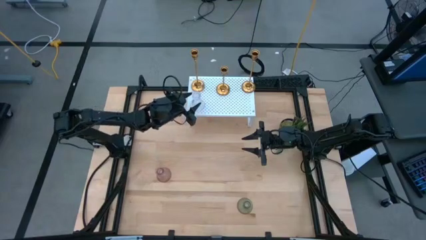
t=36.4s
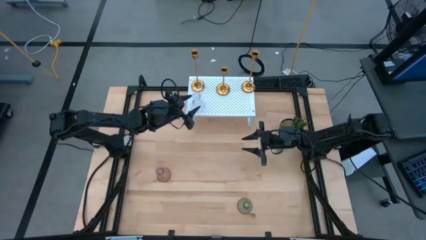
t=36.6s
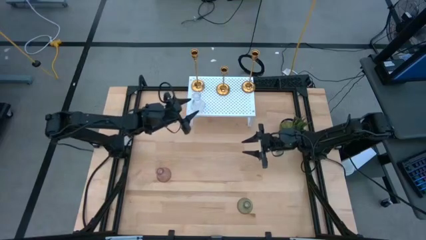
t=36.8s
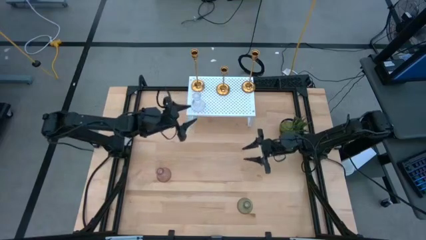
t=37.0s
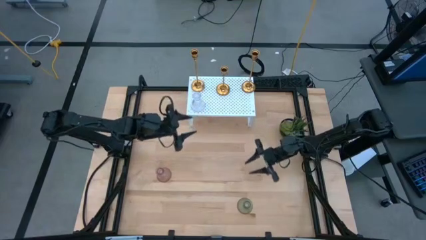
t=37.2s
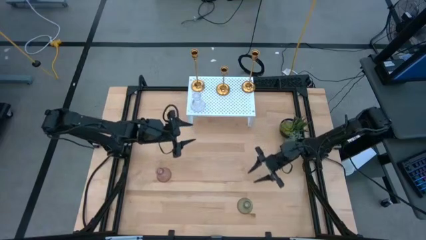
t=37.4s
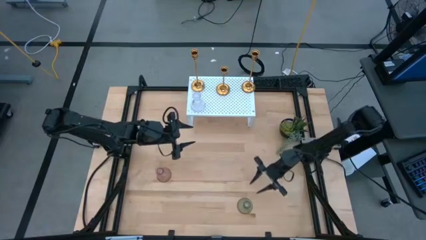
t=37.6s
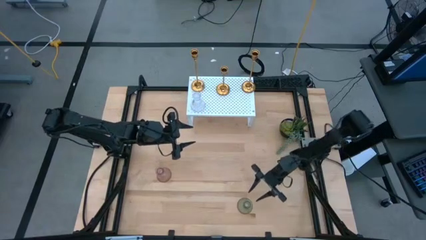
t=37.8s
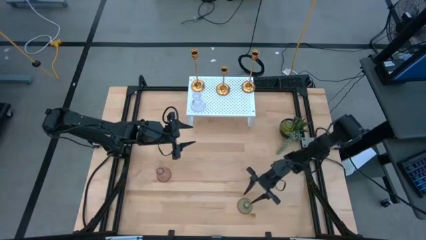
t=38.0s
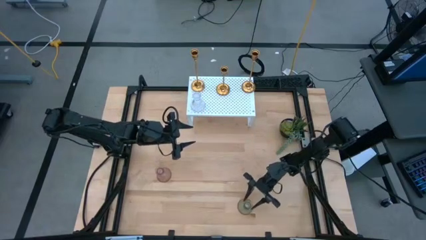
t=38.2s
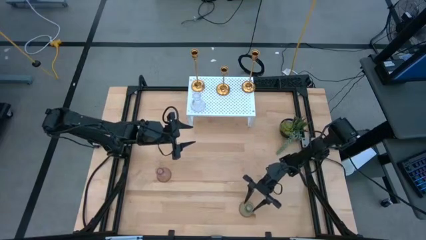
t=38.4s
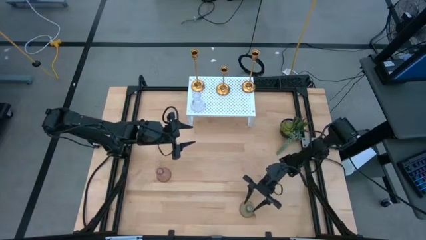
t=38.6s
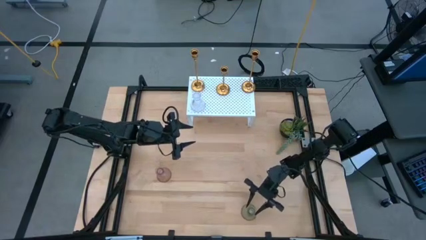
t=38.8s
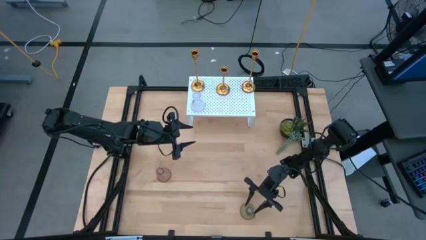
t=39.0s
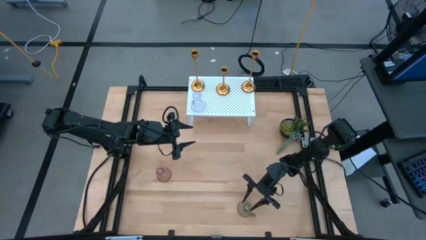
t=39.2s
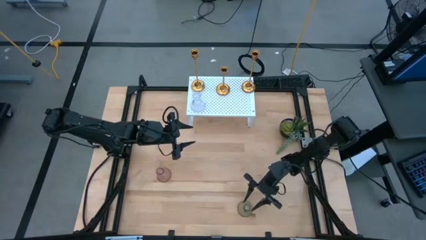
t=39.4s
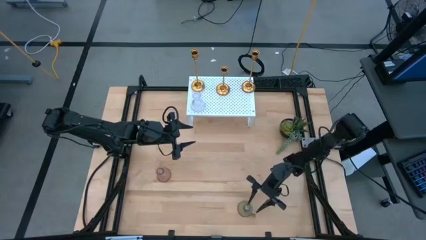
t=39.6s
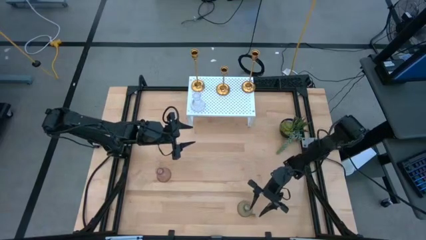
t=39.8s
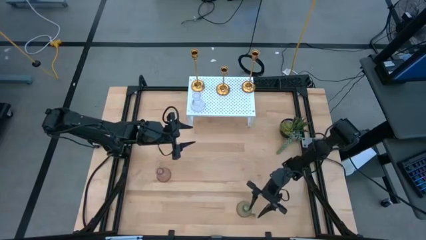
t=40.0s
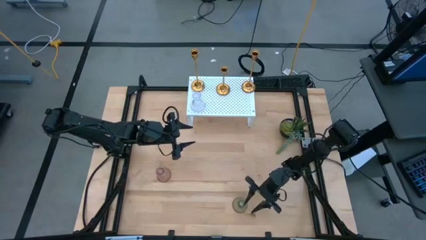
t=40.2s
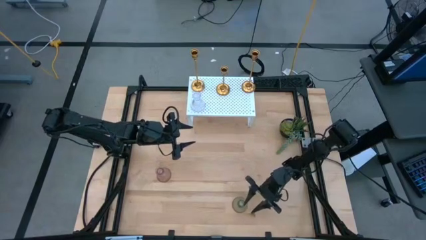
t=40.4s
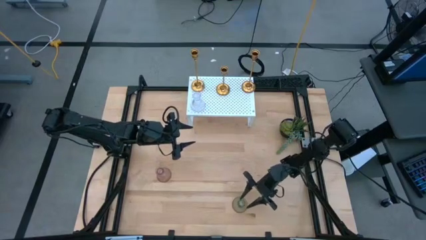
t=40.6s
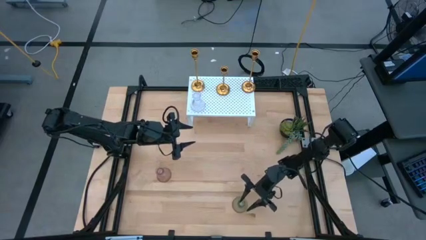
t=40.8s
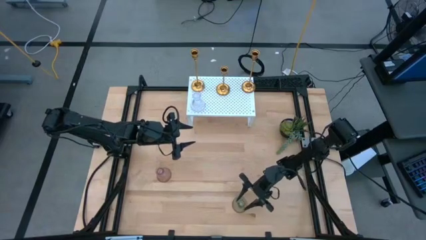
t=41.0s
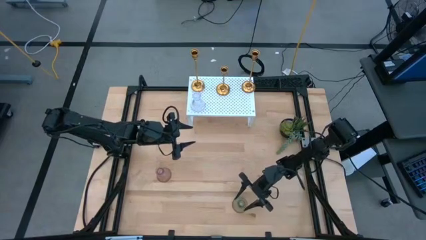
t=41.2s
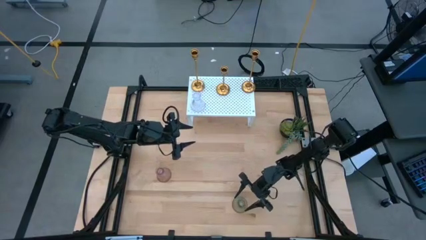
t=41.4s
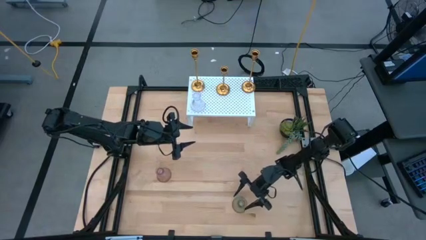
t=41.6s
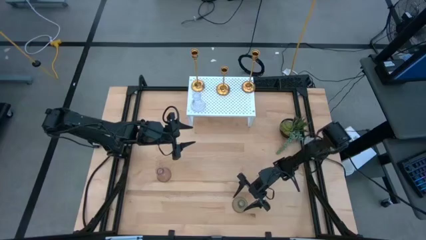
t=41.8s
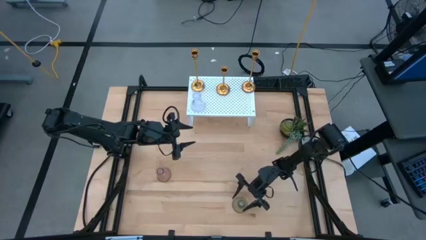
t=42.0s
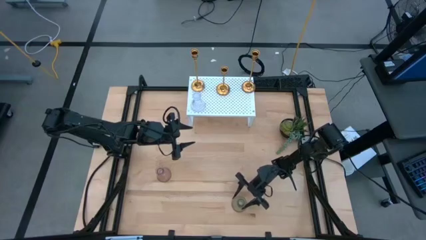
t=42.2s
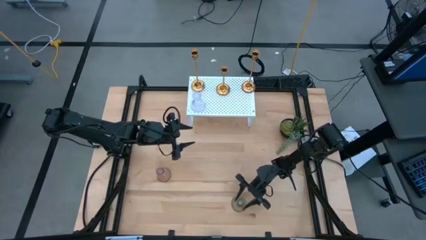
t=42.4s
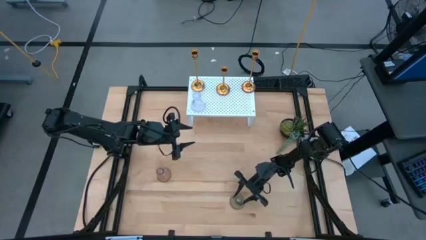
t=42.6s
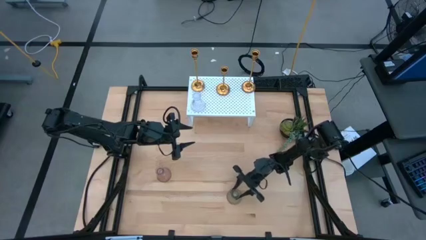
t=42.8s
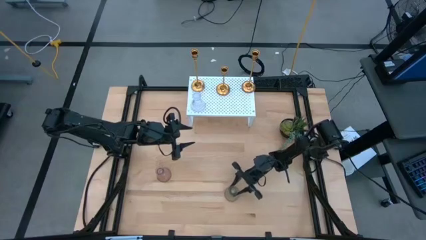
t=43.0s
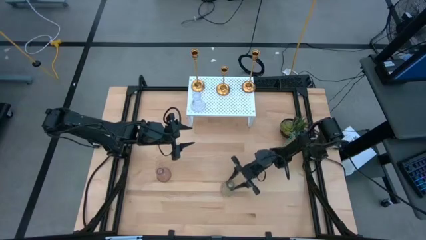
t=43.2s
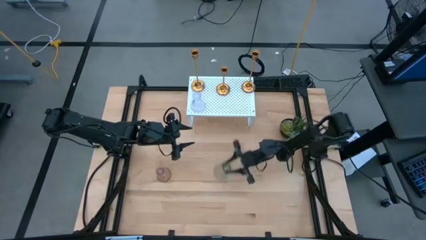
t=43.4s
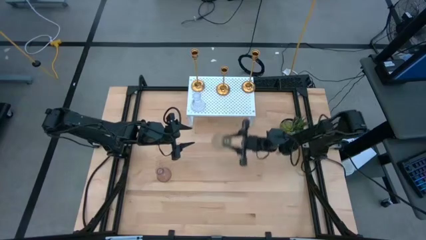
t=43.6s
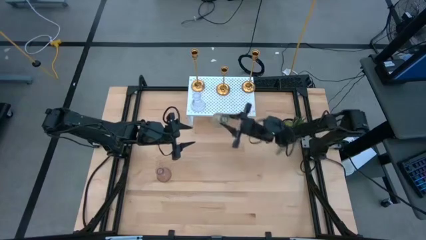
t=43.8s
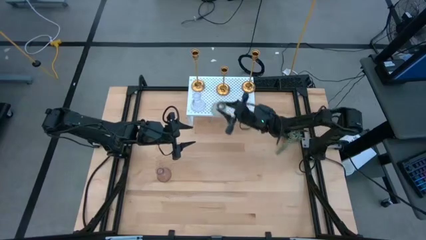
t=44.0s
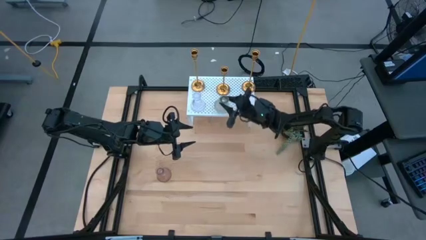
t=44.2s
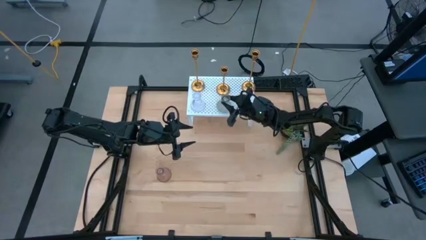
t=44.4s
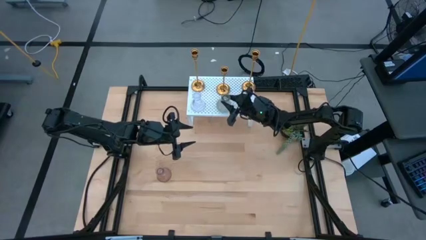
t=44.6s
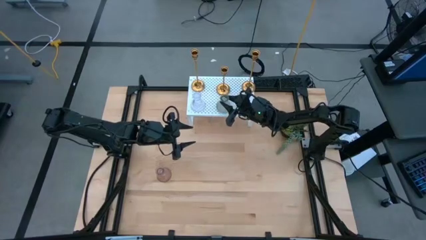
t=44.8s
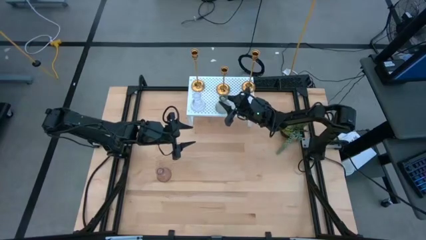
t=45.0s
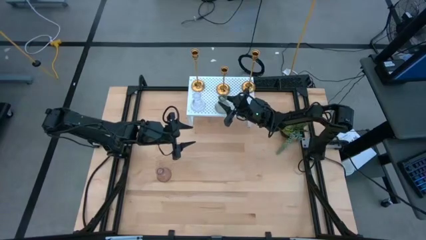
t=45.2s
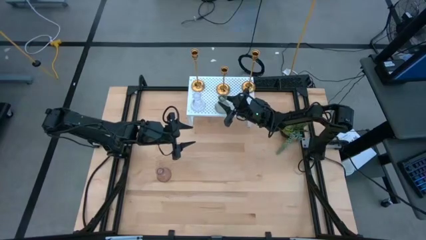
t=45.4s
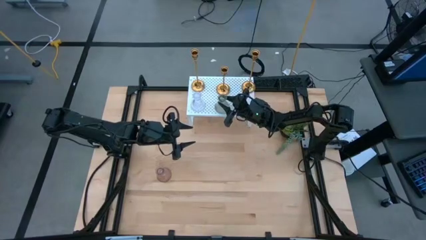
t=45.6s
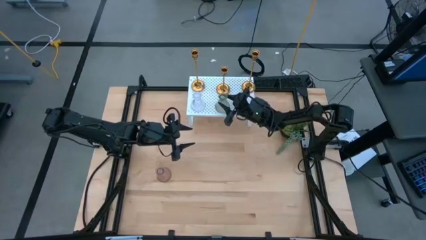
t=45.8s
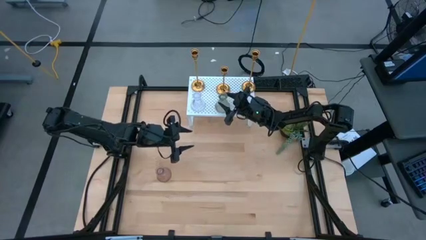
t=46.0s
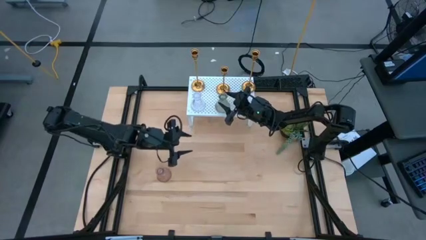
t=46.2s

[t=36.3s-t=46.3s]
Task: Pick & Place candle stick holders
Put the green glass candle holder on the shelf aligned with the other glass candle holder

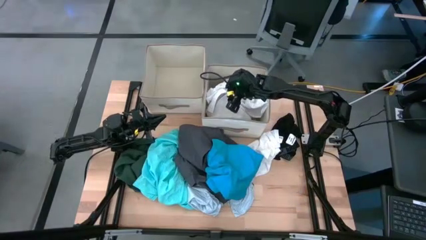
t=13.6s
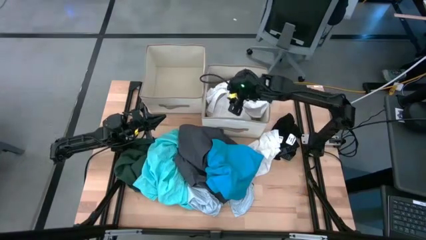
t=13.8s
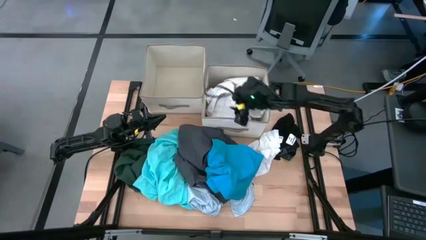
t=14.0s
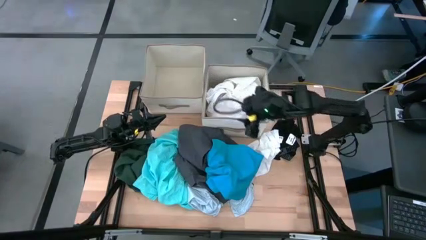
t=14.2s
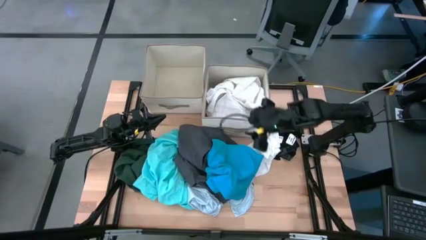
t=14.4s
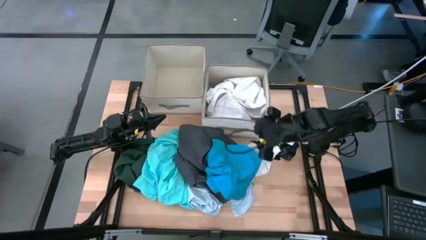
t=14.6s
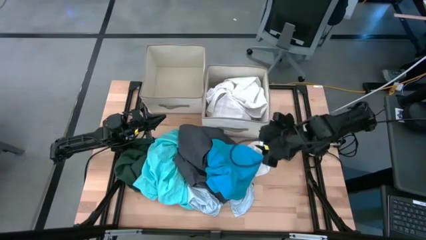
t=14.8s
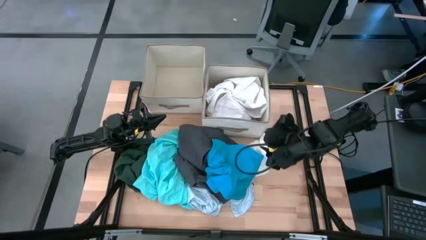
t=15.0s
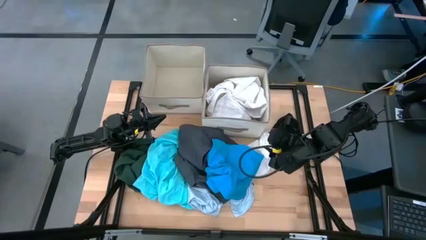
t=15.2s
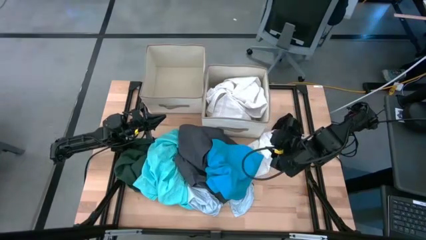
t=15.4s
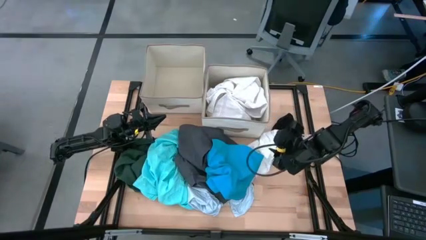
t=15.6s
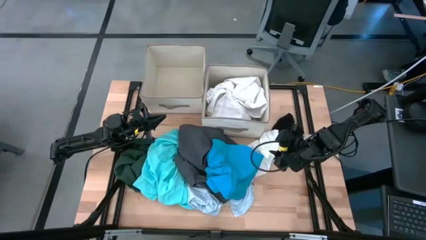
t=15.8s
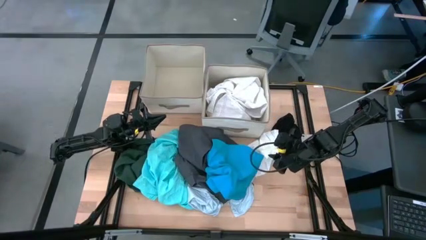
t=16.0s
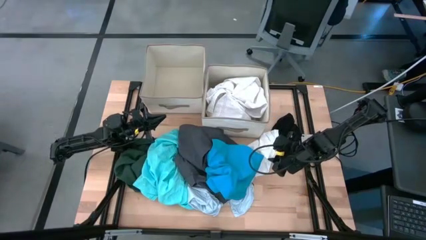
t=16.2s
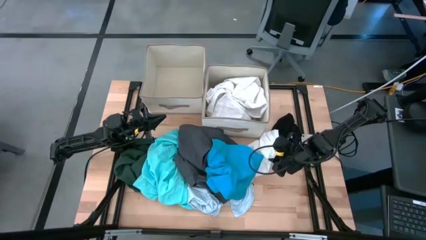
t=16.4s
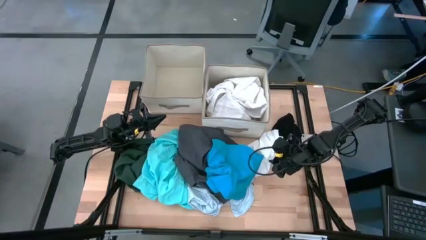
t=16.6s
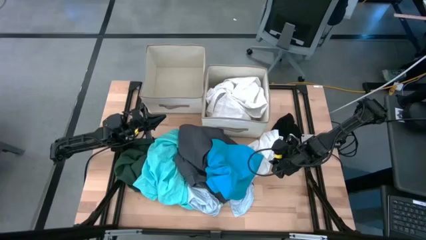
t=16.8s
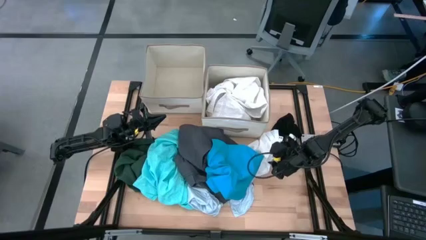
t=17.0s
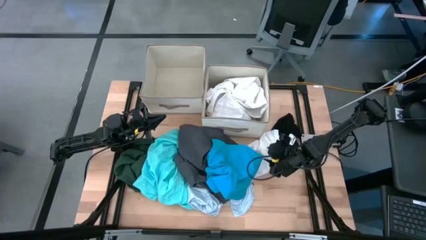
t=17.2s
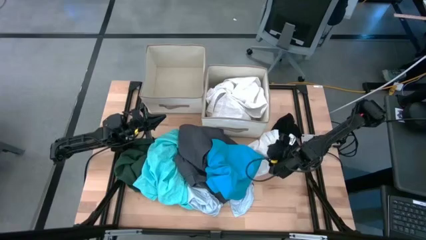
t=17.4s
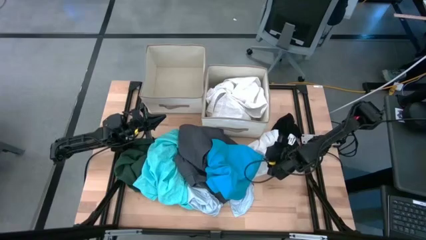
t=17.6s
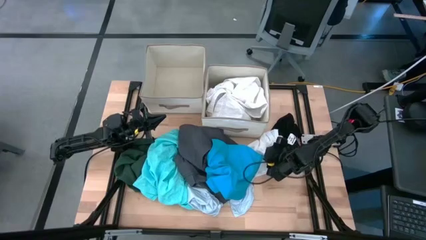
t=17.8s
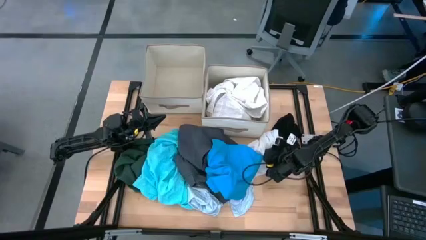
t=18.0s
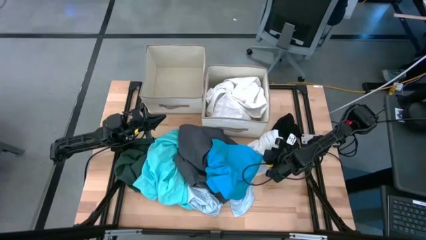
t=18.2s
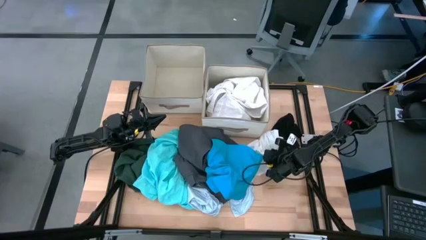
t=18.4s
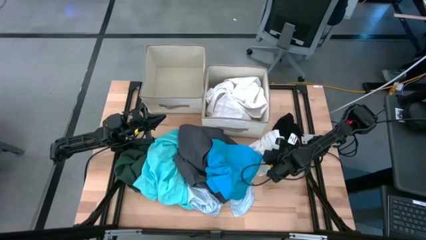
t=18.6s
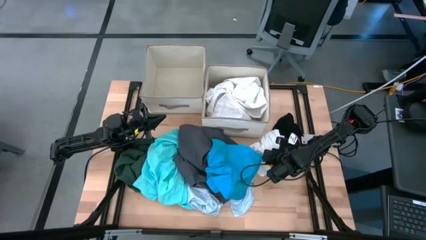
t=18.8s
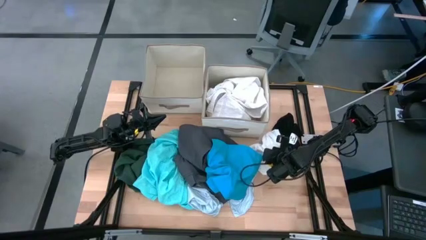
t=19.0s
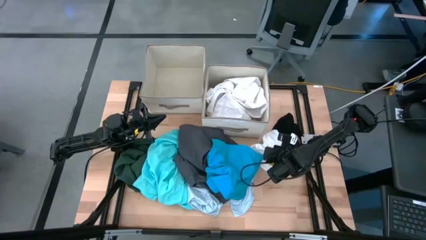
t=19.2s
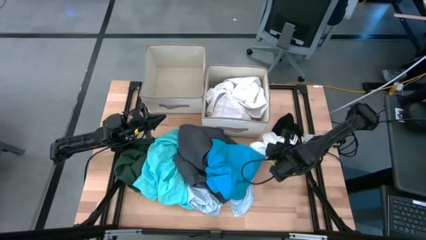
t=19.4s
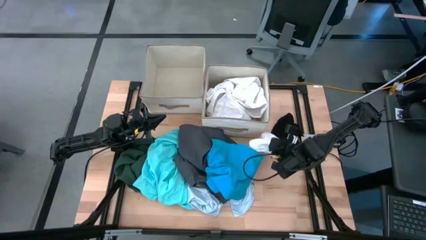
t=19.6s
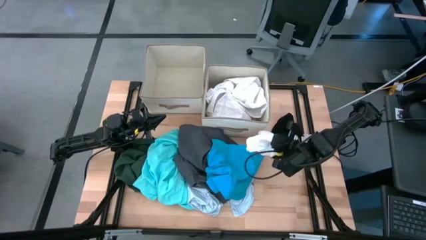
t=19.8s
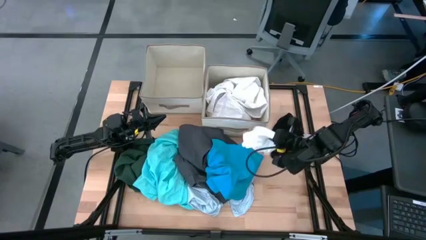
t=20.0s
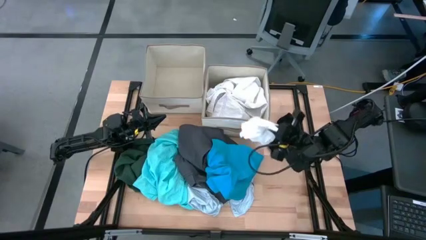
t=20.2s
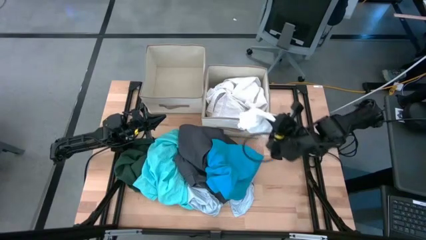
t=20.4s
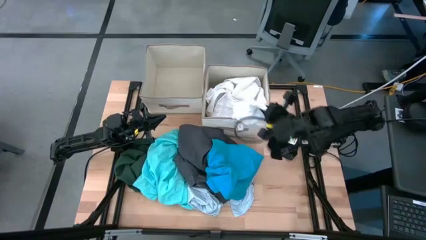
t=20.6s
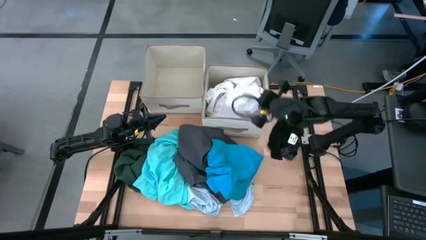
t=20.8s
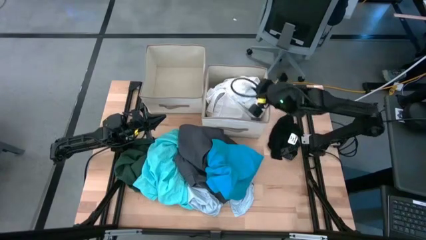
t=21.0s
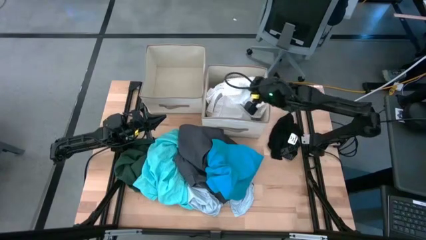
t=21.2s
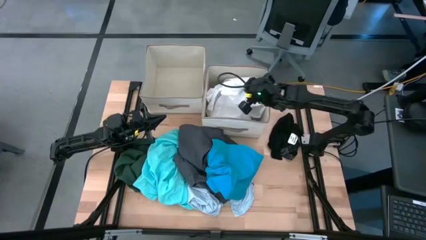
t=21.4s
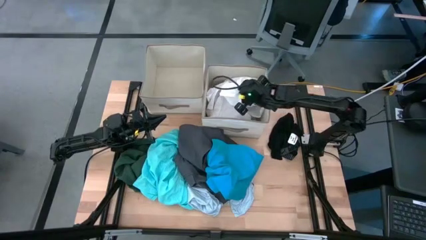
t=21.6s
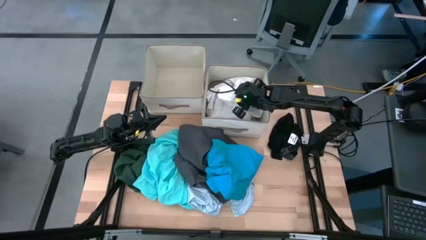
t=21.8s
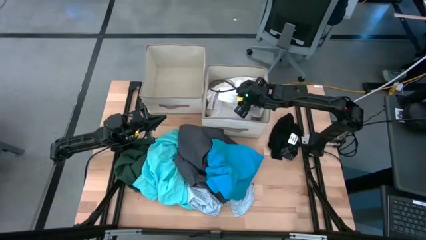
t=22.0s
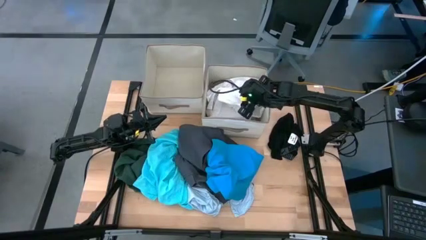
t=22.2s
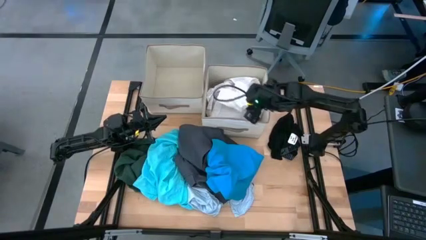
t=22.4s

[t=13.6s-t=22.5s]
Task: Sort clothes
Put the white underwear into the right laundry organizer
